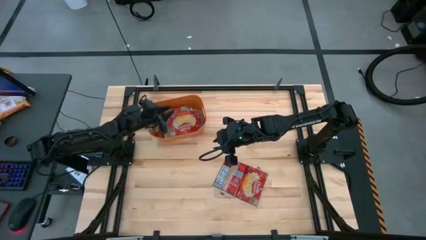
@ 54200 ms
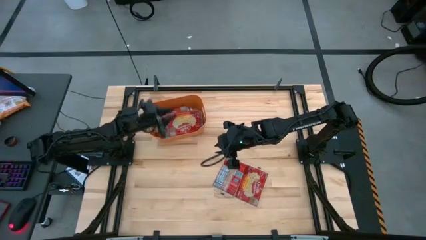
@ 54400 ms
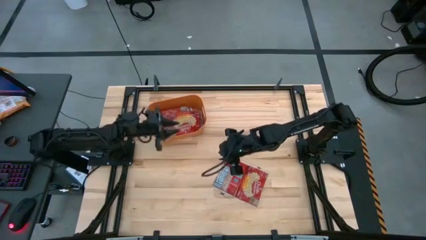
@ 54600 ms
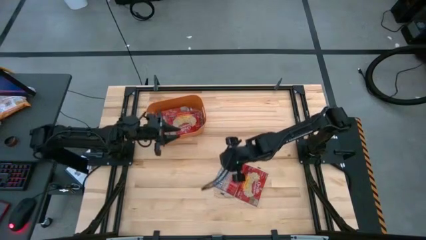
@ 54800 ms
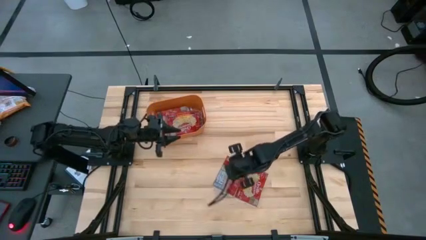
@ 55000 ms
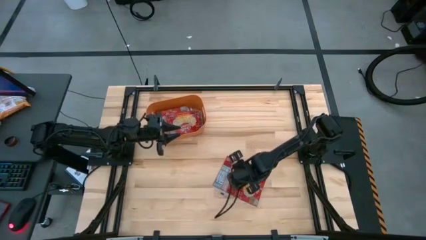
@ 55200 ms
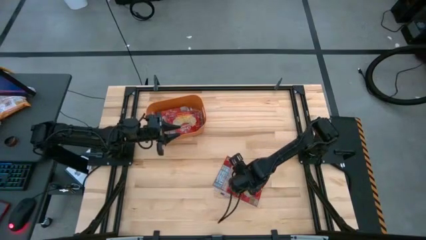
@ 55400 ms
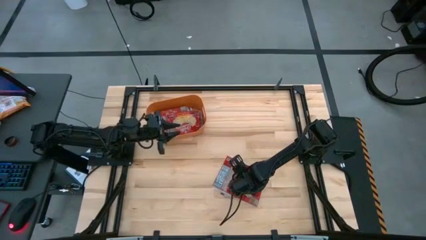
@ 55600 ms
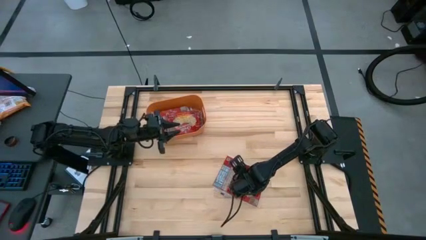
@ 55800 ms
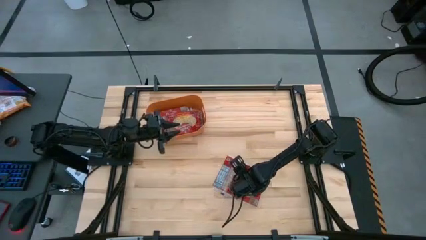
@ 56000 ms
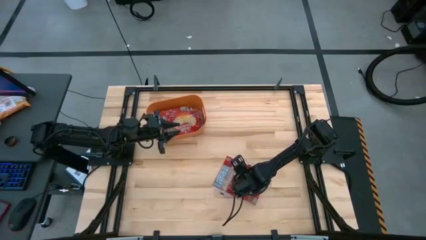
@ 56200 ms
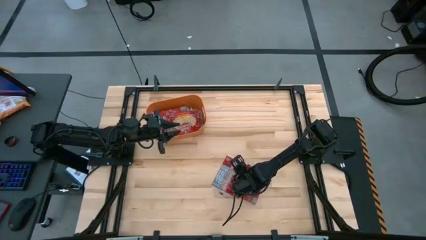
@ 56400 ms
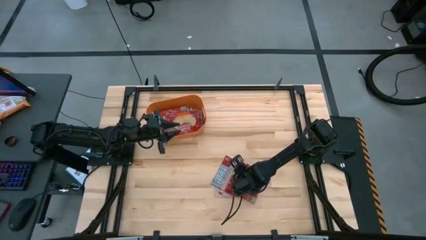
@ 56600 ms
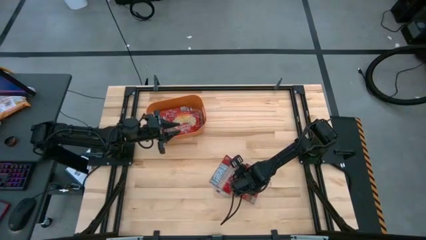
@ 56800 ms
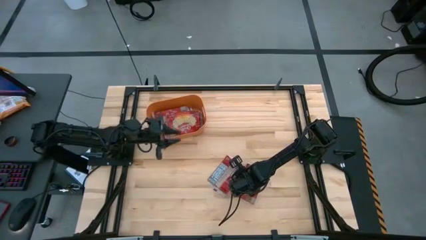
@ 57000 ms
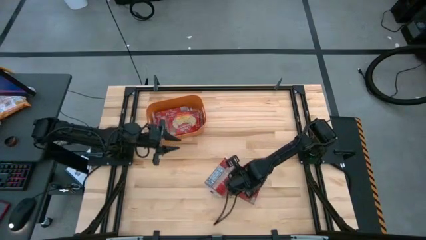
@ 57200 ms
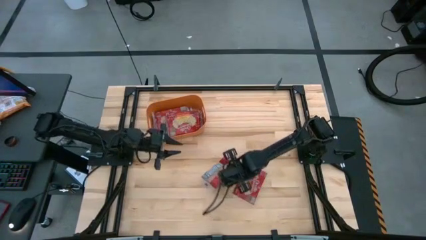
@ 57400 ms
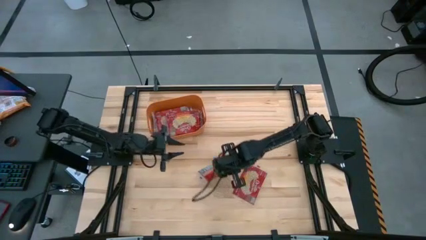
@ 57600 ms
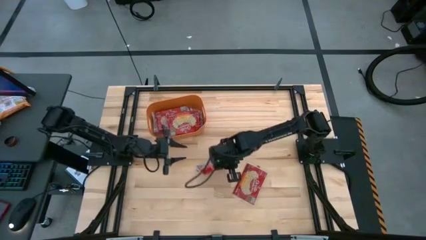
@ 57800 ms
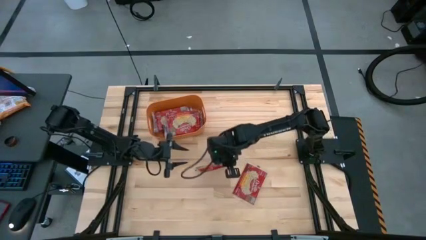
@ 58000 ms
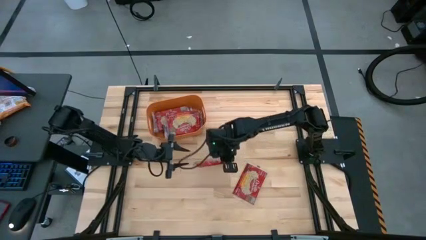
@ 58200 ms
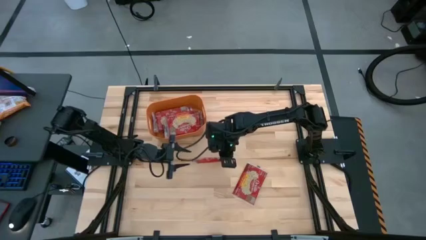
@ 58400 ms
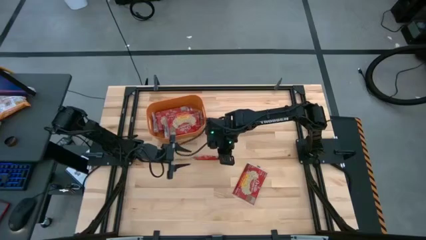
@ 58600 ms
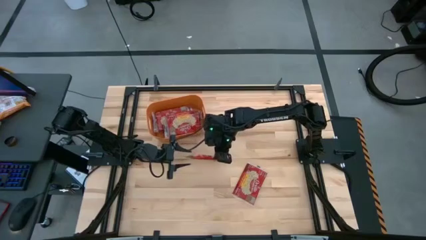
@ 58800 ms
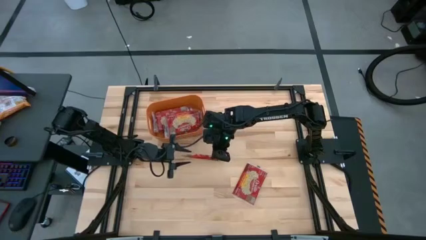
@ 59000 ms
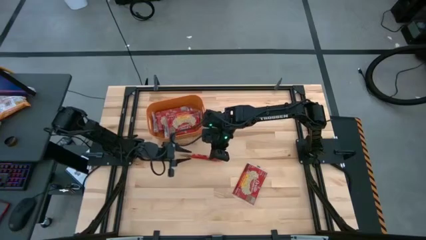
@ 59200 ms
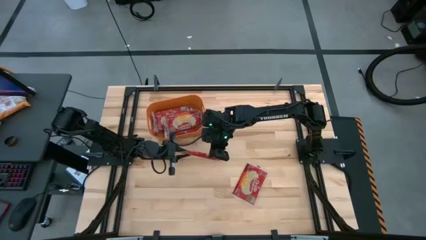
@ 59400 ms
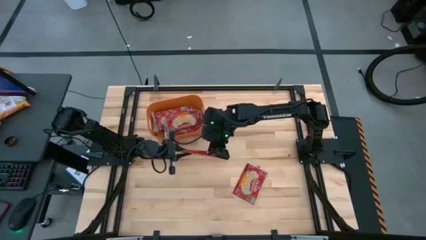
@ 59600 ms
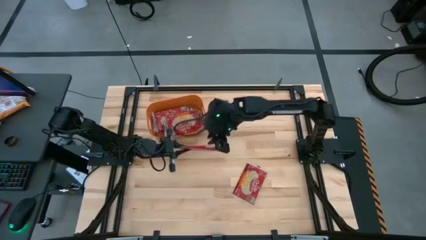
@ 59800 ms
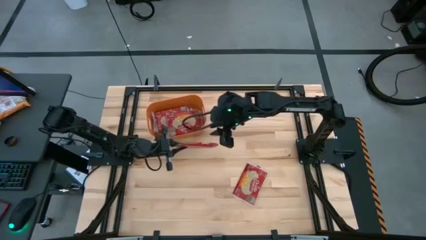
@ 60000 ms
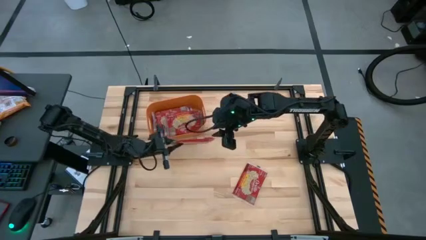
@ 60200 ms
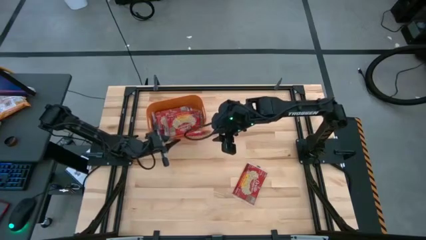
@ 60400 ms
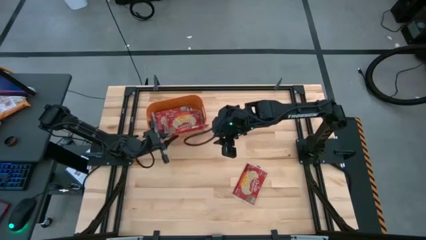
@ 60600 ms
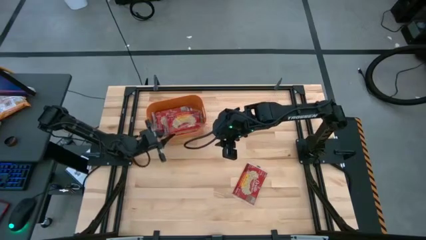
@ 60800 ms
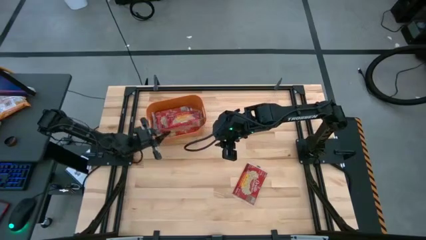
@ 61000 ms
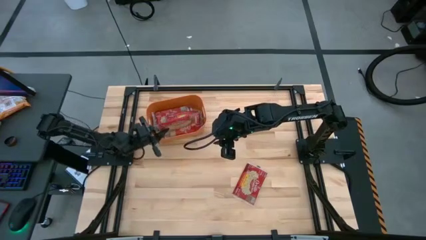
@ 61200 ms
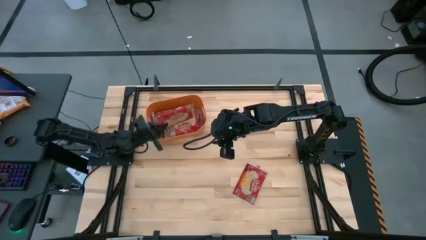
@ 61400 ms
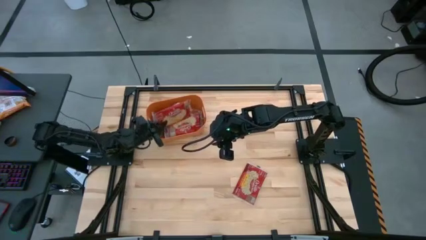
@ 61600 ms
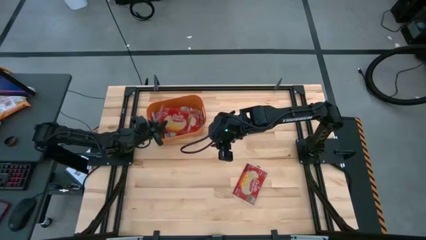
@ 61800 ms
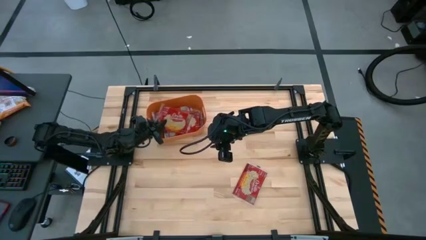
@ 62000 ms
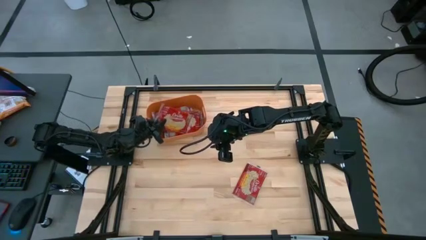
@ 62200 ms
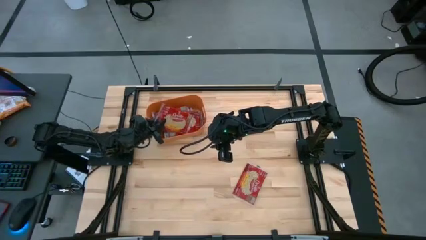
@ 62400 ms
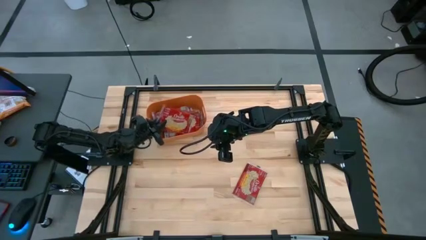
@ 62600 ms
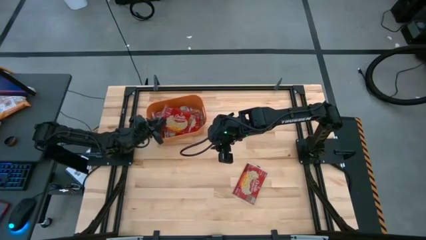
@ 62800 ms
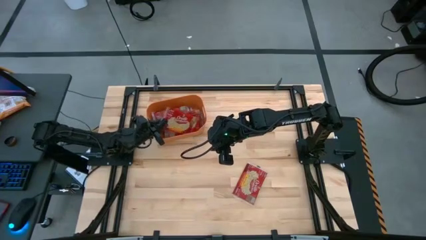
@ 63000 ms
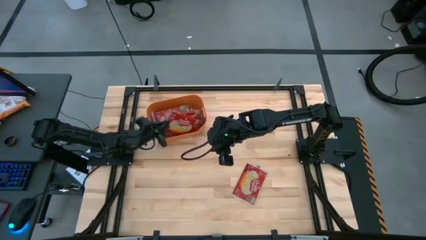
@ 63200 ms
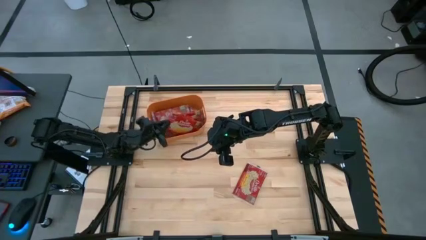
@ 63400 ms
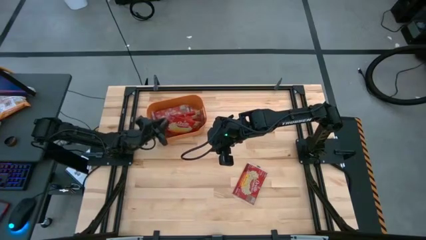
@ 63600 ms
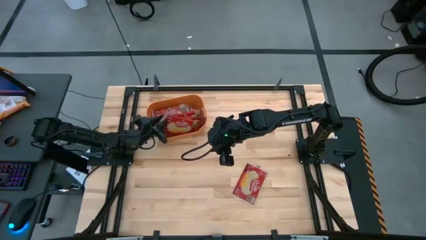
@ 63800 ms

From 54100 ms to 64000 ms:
Task: Sort popcorn bags into baskets
Put the red popcorn bag into the orange container

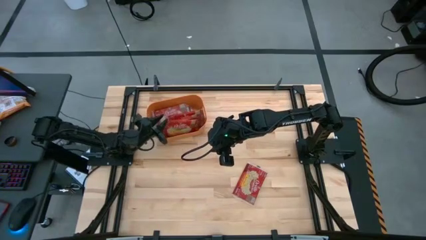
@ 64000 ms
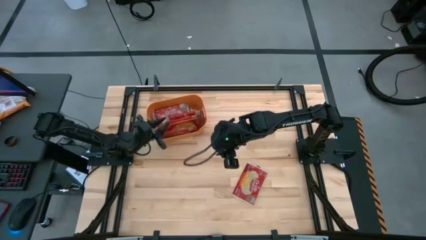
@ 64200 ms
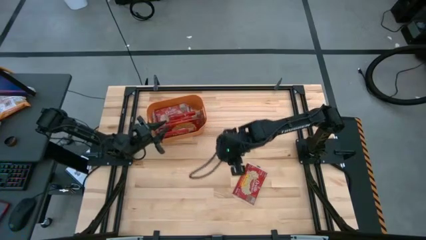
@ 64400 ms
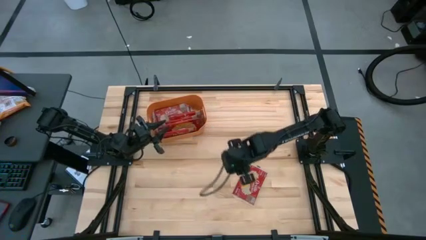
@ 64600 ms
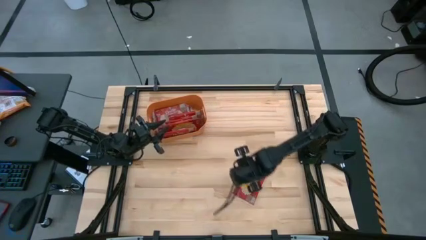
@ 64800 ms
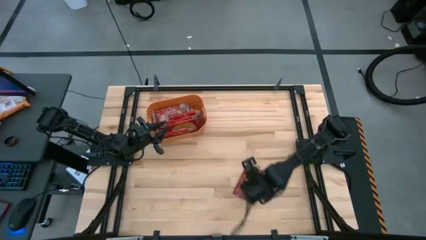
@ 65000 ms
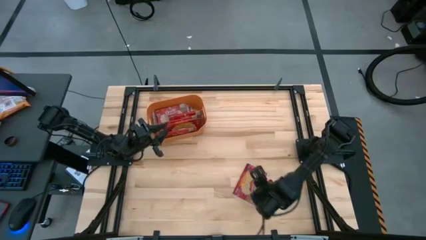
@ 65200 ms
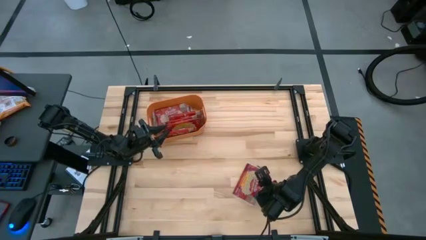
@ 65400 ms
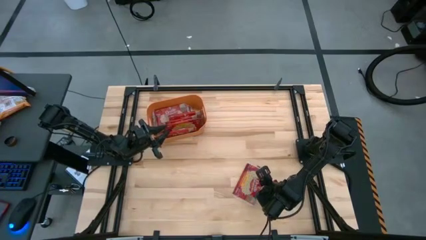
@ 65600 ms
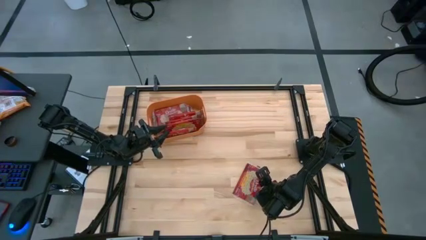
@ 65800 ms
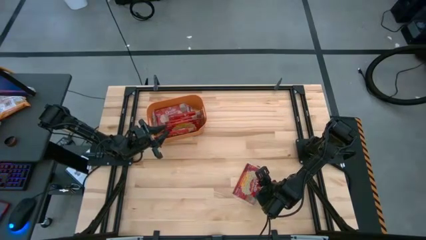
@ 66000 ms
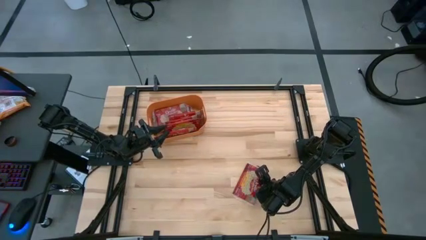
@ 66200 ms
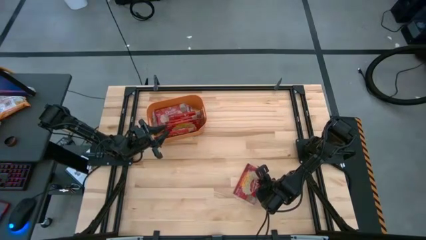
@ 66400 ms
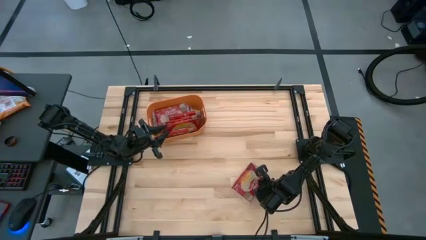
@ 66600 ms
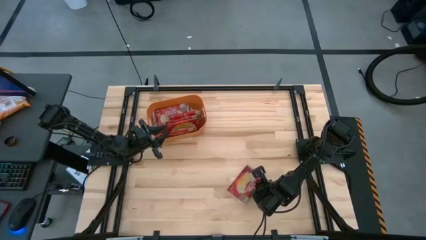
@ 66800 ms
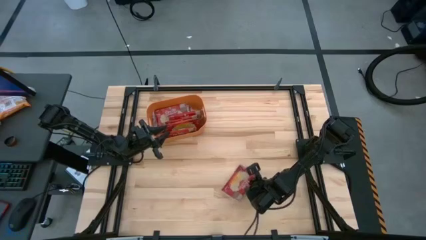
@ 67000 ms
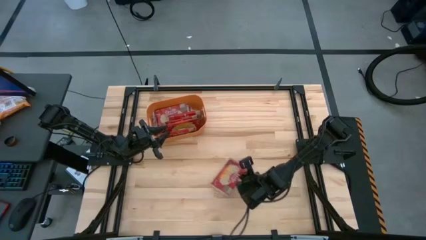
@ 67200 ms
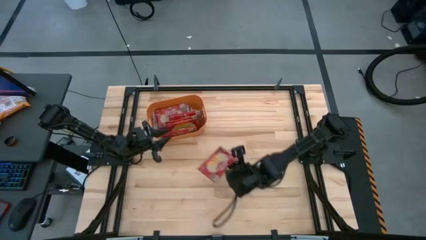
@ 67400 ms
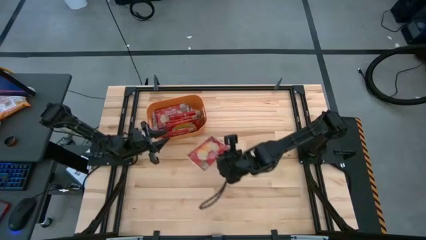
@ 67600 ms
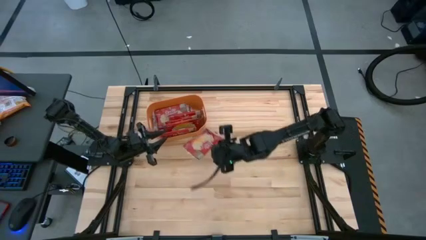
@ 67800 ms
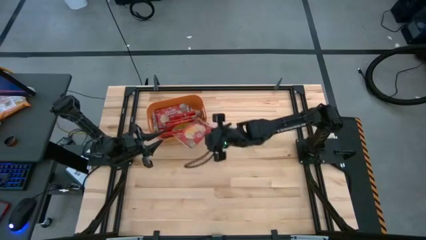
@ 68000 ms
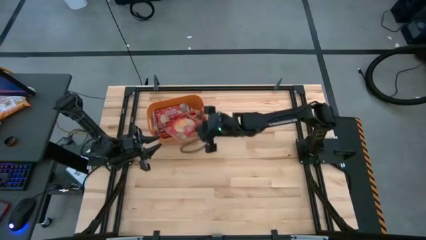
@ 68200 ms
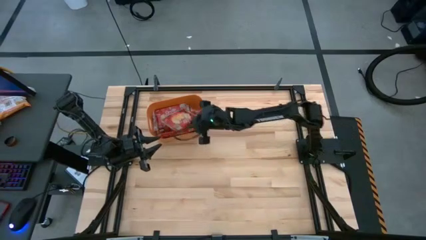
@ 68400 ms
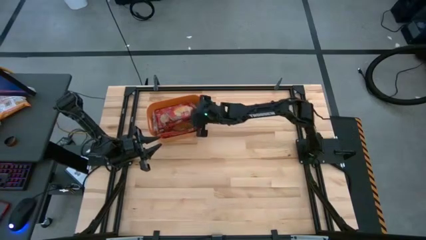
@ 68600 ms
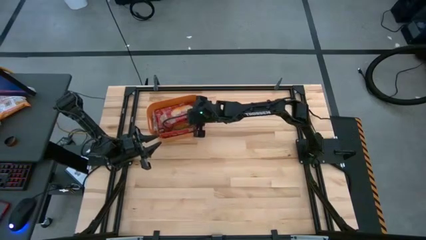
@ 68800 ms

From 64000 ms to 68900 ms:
Put the red popcorn bag into the orange container

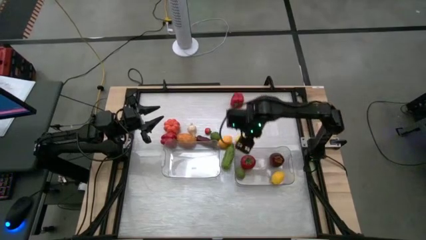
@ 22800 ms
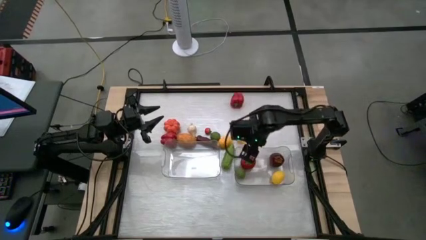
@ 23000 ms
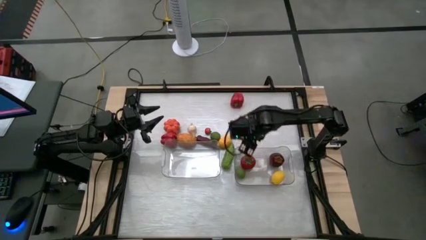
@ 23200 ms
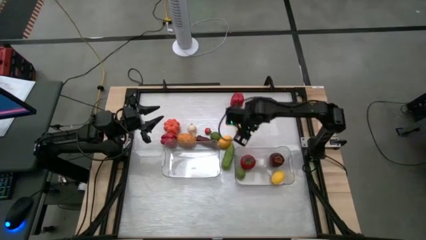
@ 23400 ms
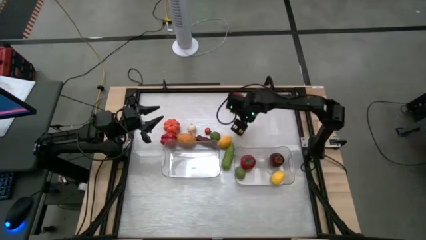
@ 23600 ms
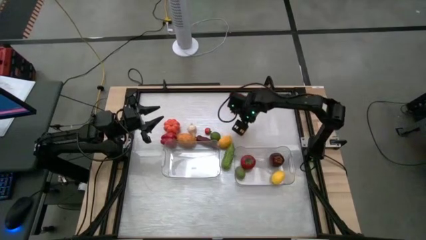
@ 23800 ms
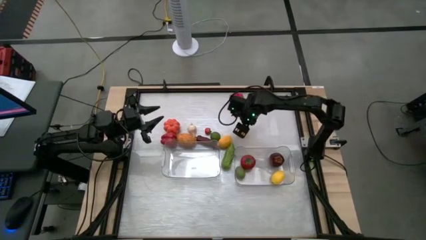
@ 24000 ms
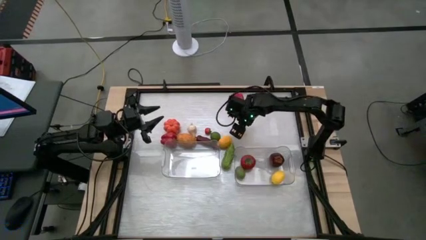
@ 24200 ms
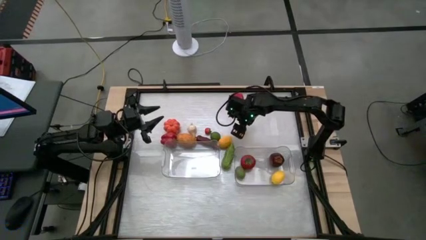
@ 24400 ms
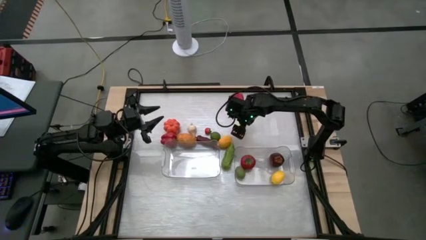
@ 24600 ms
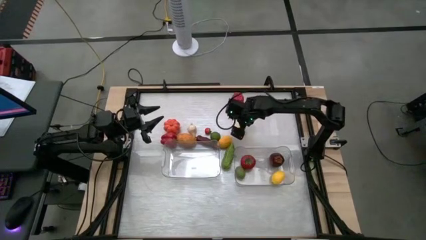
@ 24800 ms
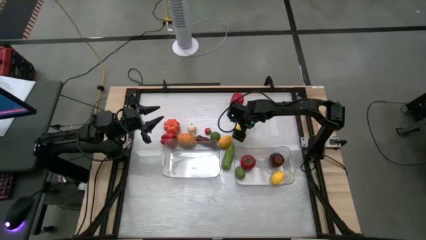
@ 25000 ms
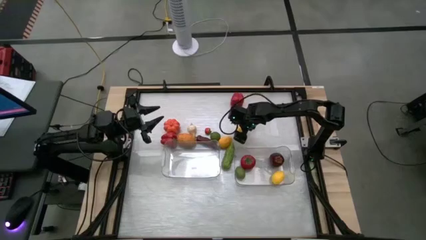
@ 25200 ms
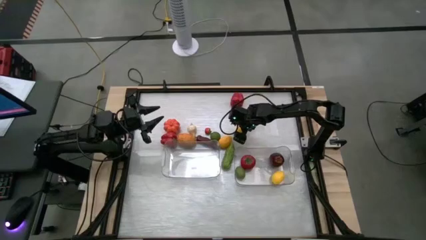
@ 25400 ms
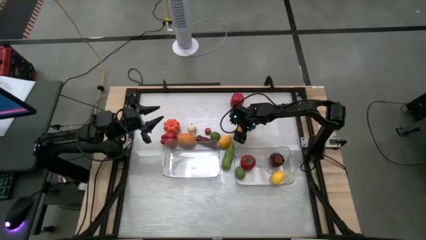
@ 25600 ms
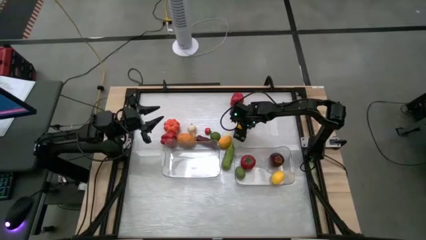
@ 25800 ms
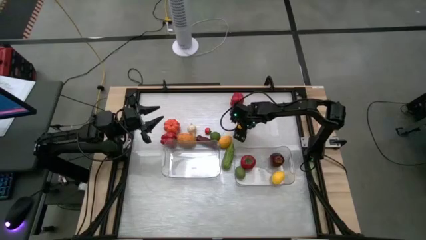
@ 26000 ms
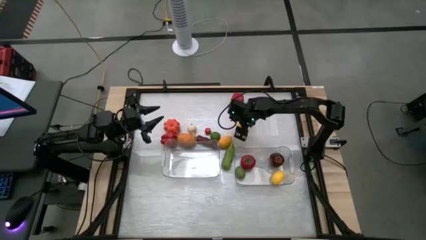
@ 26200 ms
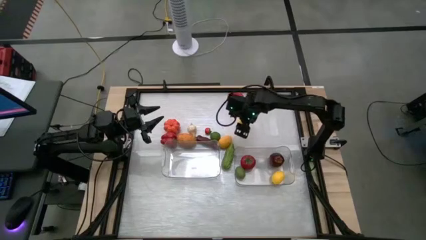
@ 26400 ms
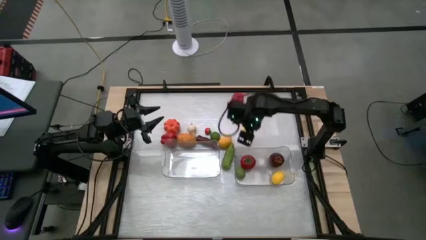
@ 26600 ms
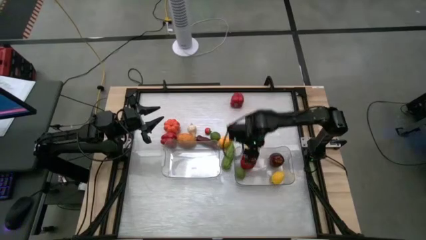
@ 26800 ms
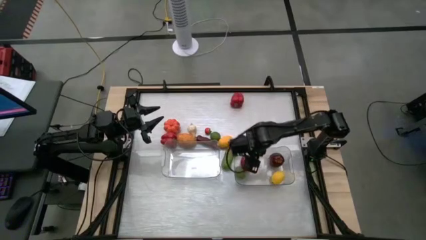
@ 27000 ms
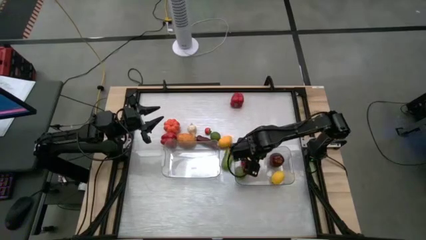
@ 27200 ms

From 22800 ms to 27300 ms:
Task: Sort produce into baskets
Put the top lemon into the right transparent bin
